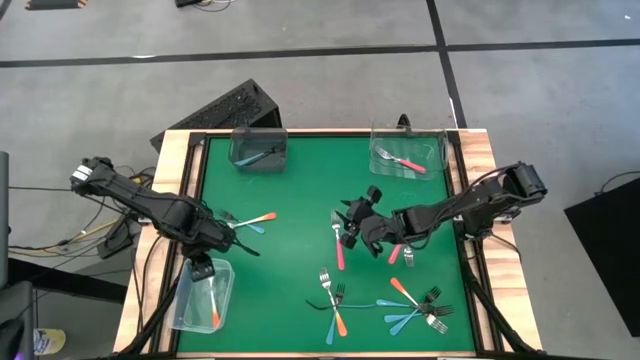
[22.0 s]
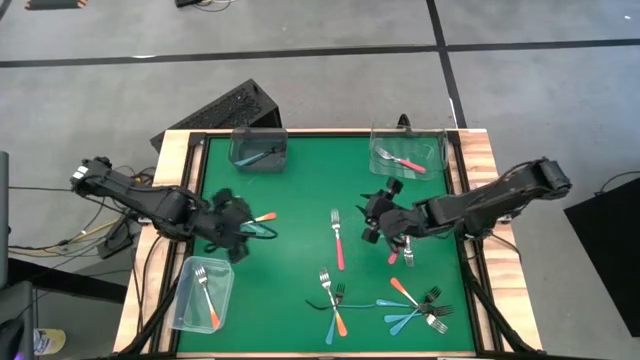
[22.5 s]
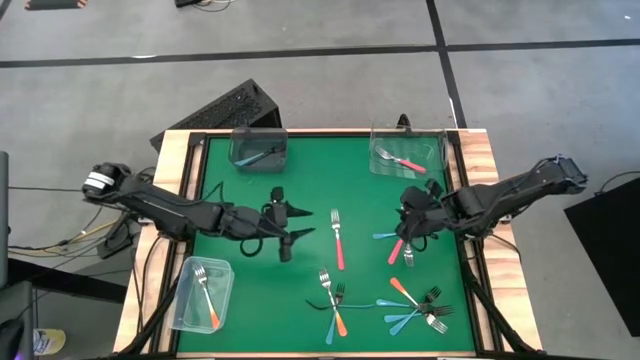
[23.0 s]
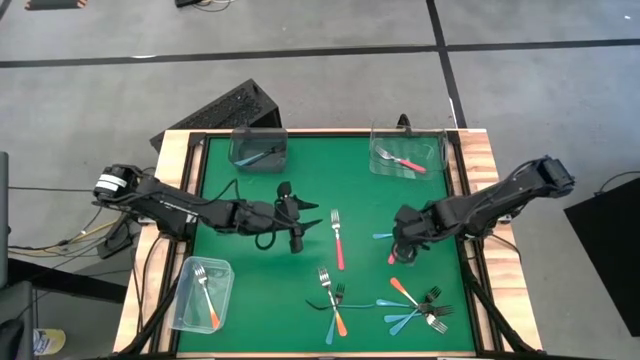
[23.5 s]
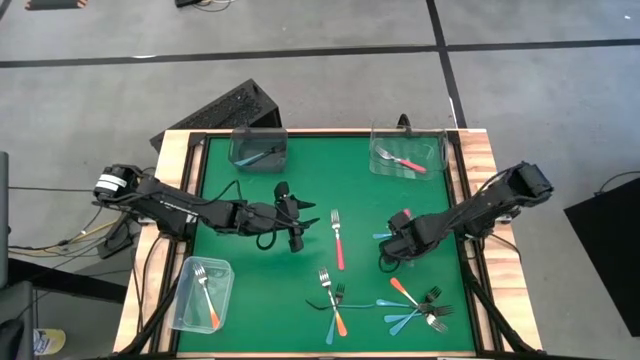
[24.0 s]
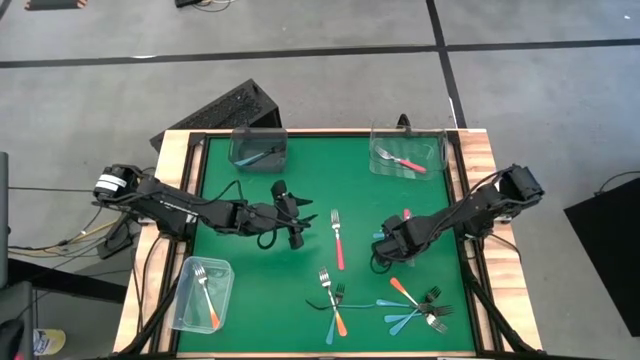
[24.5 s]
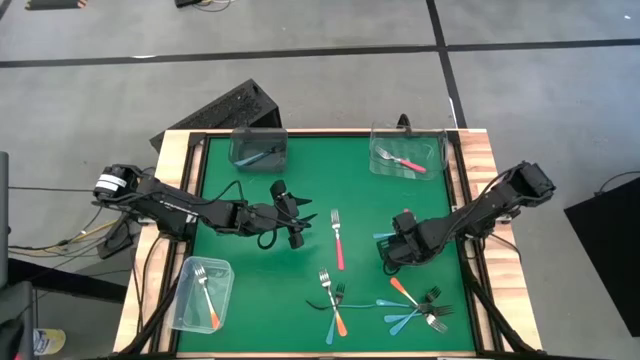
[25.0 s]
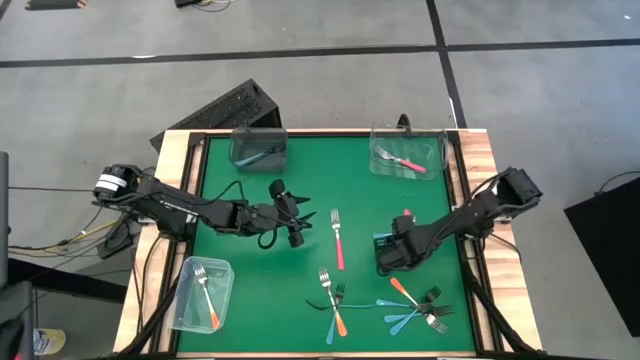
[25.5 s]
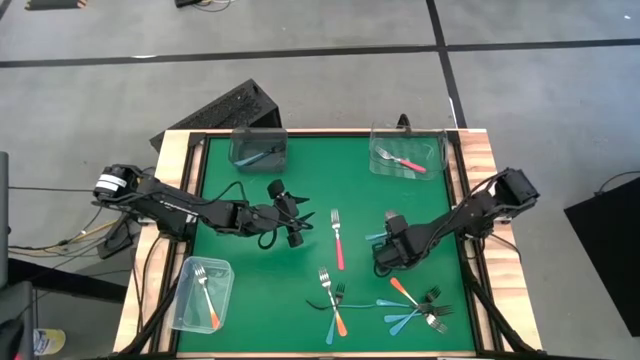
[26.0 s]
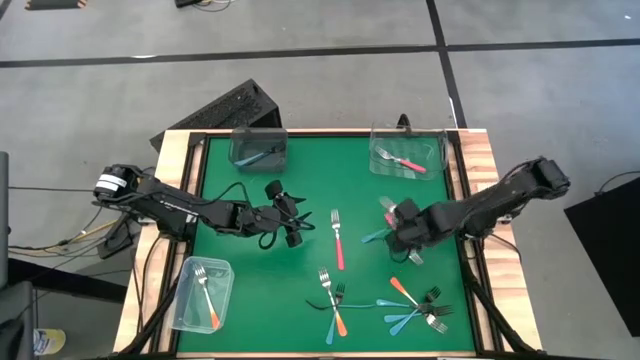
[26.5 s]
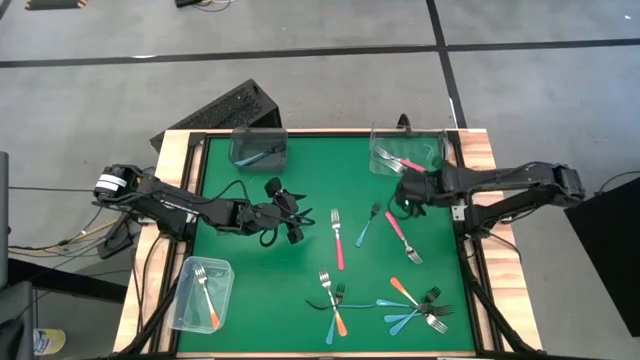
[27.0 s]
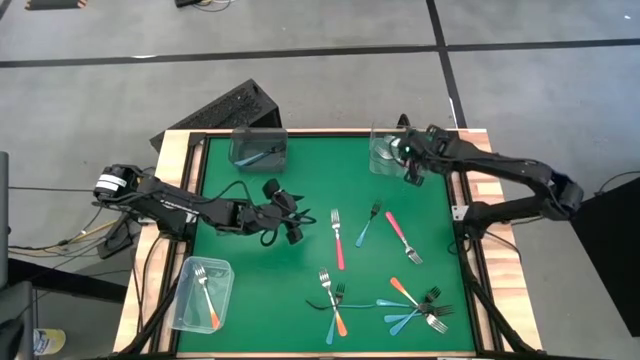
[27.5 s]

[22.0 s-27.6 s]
Task: Sort silverware by color (type)
Put the pink fork into the transparent bin

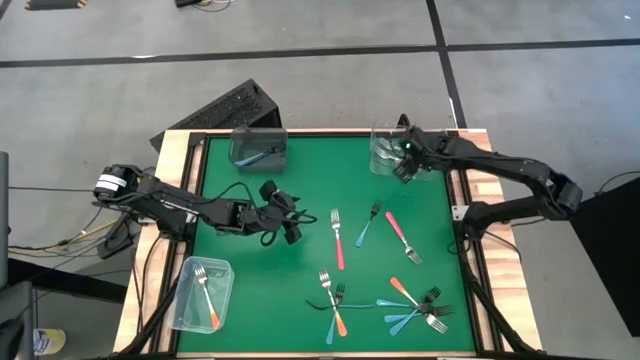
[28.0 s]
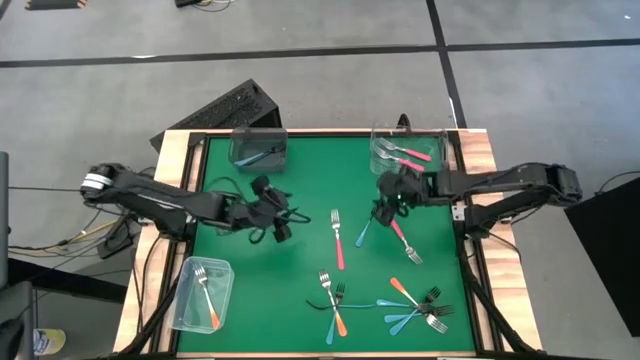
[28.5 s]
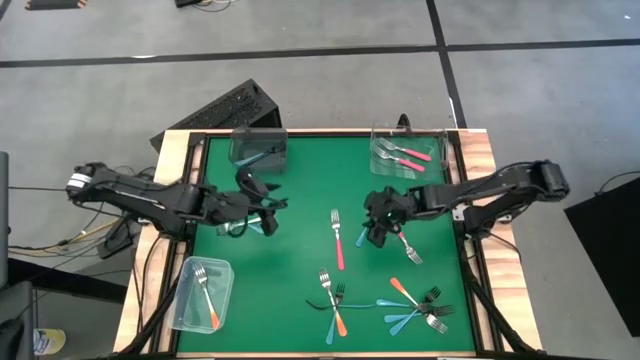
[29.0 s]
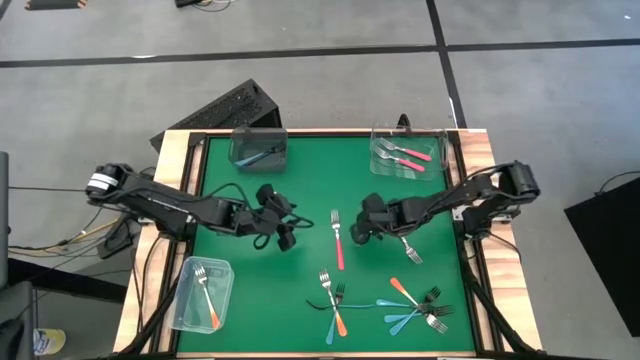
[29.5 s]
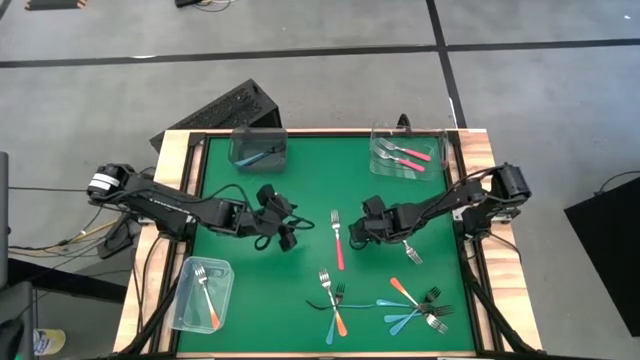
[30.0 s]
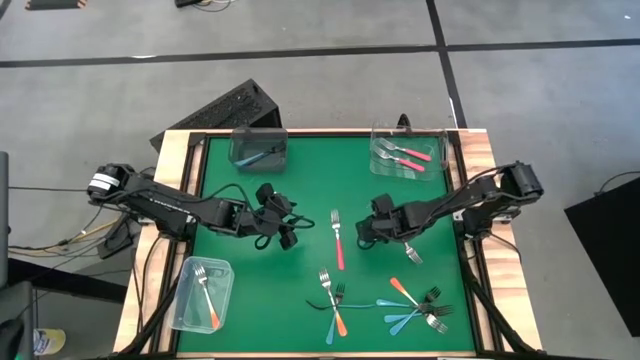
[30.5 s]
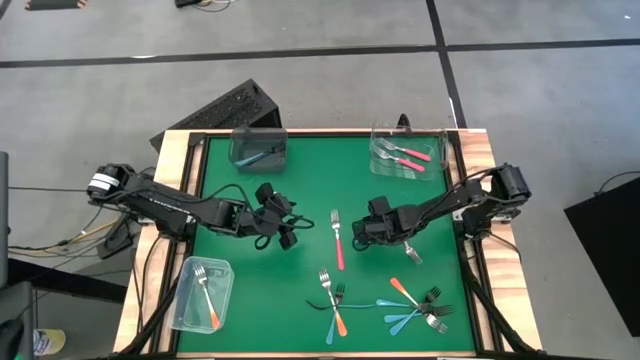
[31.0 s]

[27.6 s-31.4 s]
Put the blue fork into the black bin

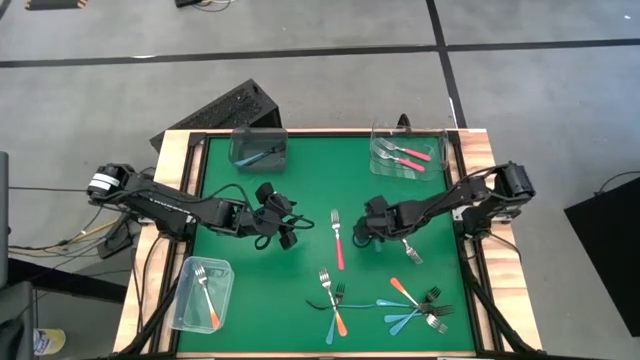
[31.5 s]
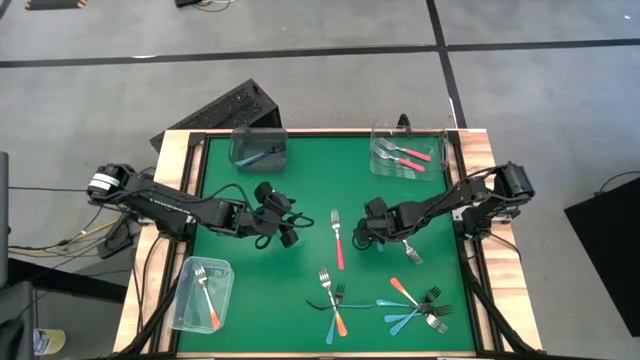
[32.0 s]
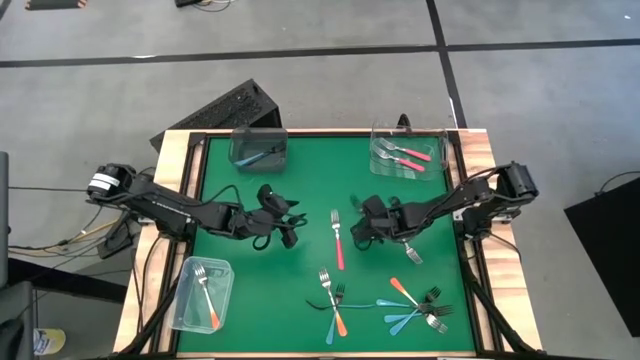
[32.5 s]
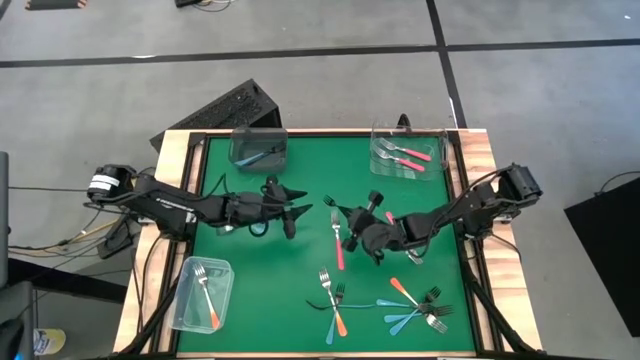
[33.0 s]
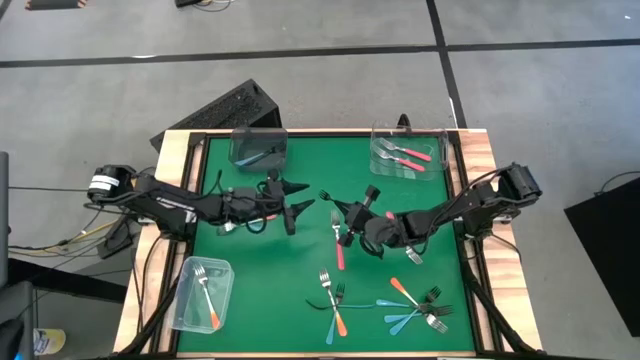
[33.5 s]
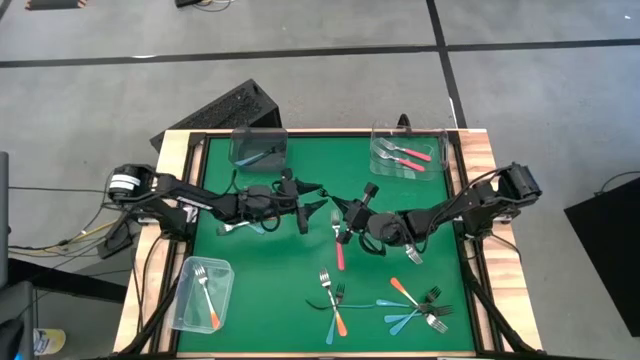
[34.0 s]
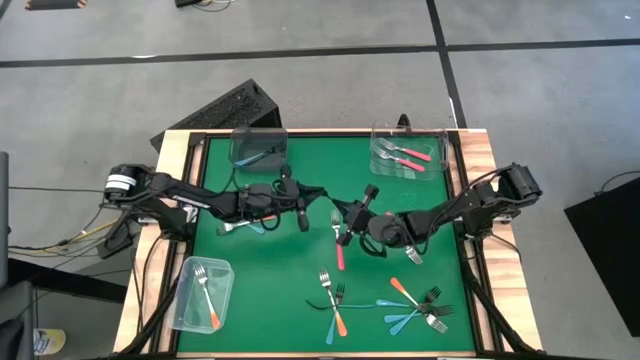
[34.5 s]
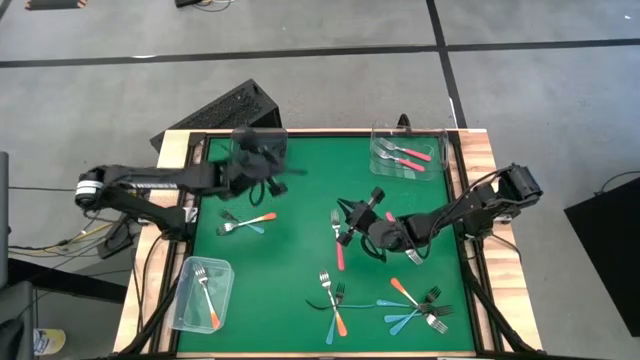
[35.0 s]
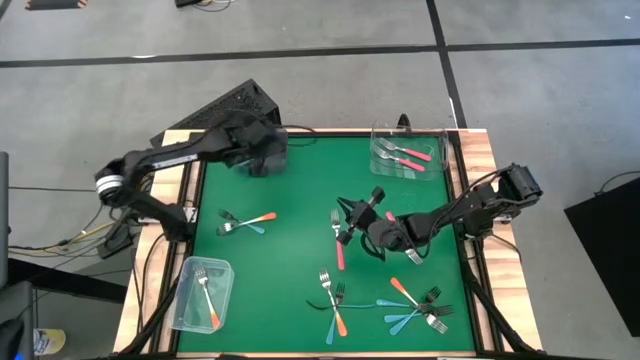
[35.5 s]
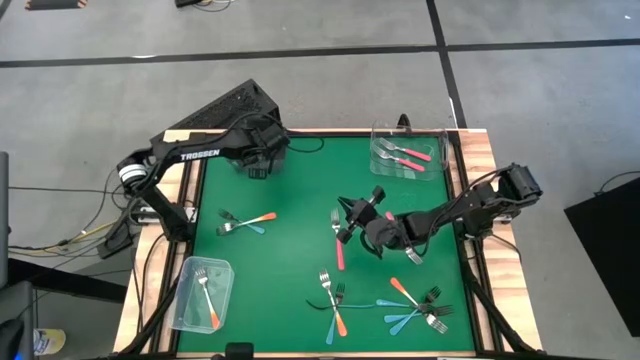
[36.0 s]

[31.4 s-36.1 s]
Put the blue fork into the black bin

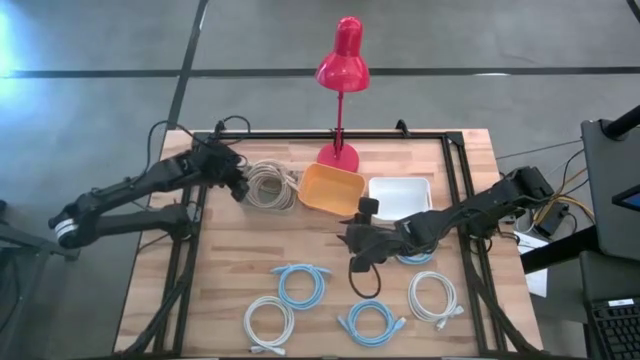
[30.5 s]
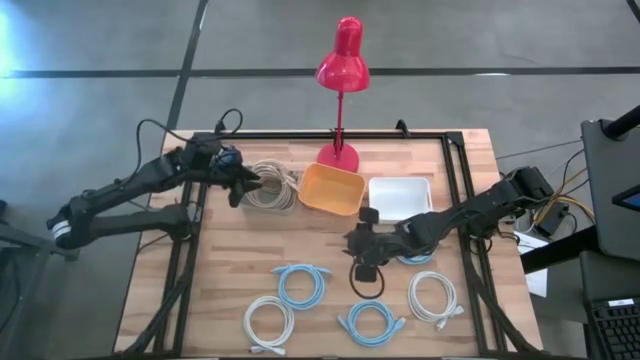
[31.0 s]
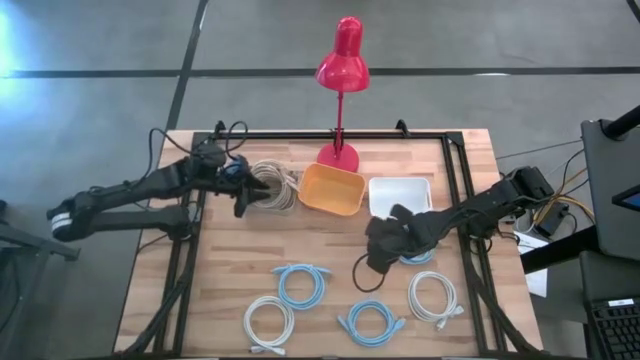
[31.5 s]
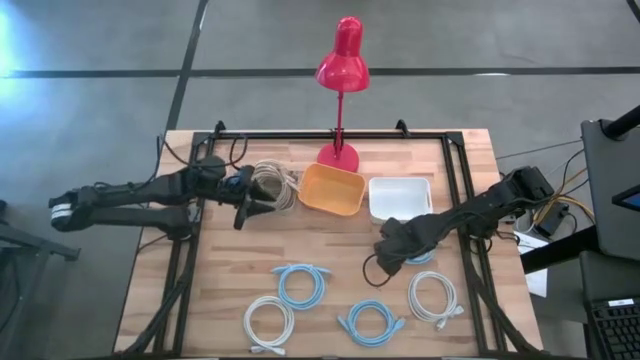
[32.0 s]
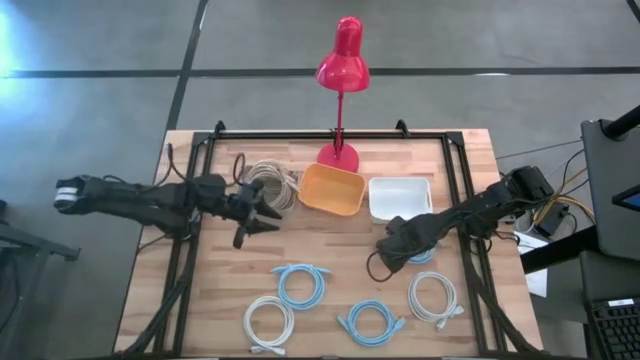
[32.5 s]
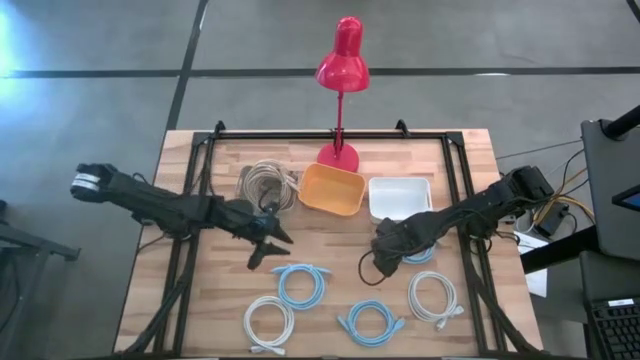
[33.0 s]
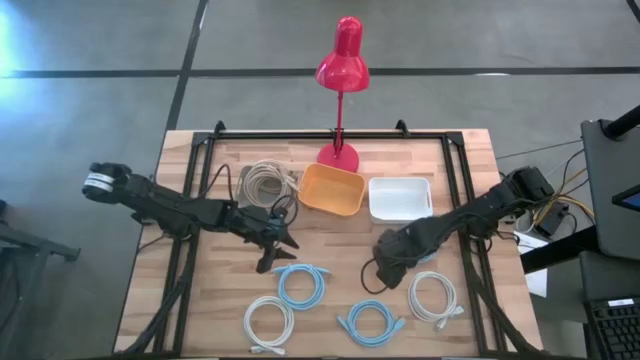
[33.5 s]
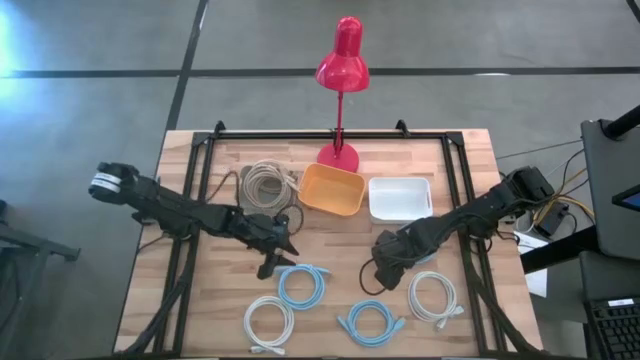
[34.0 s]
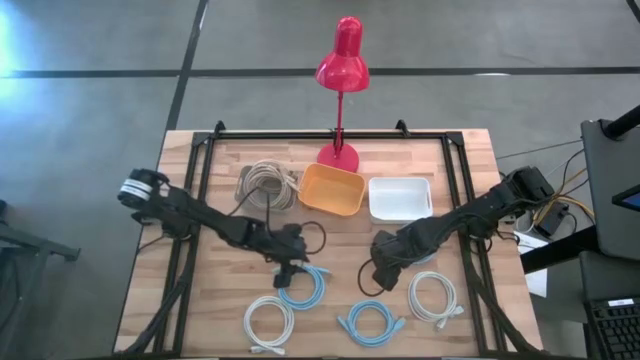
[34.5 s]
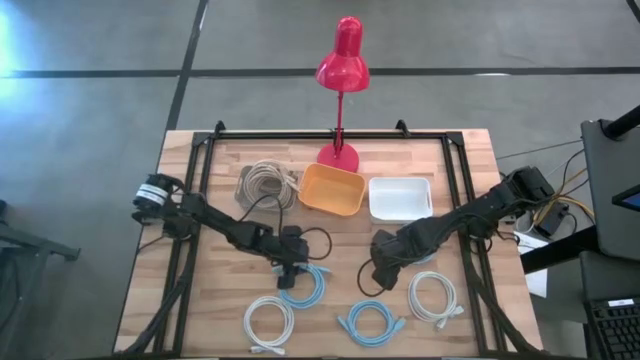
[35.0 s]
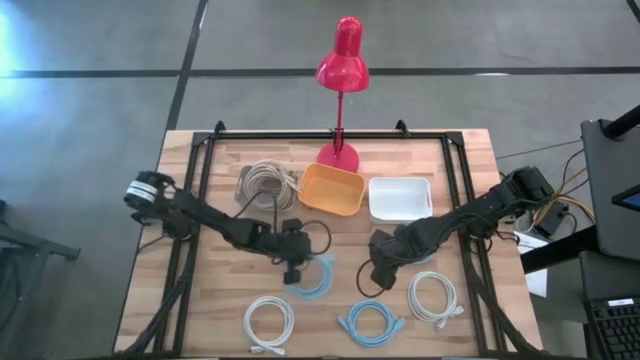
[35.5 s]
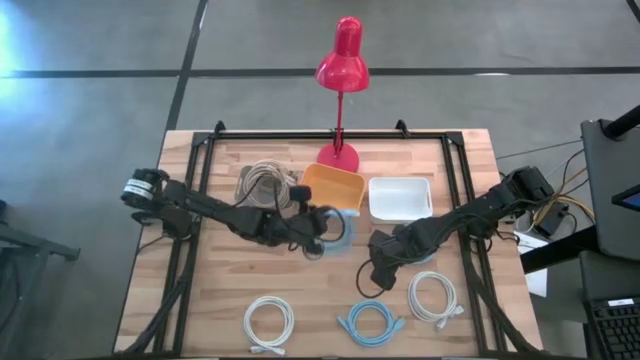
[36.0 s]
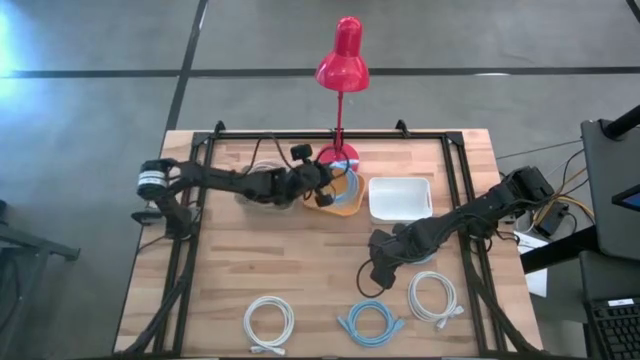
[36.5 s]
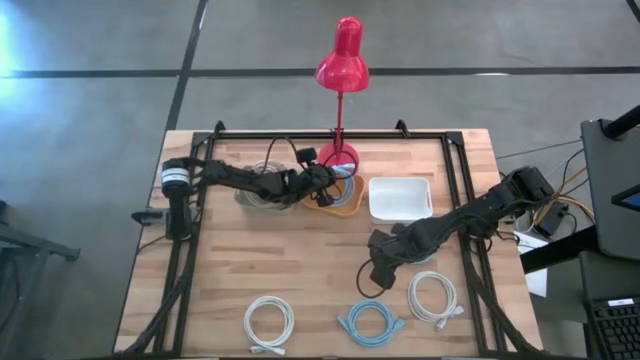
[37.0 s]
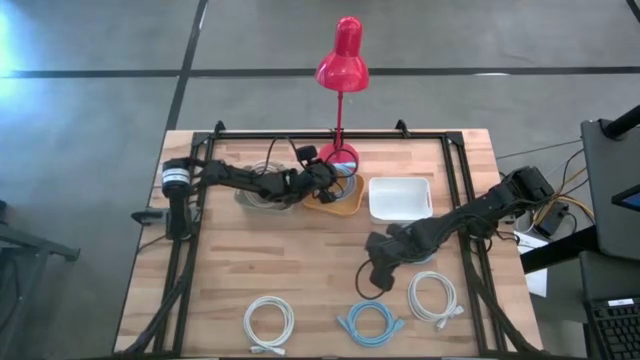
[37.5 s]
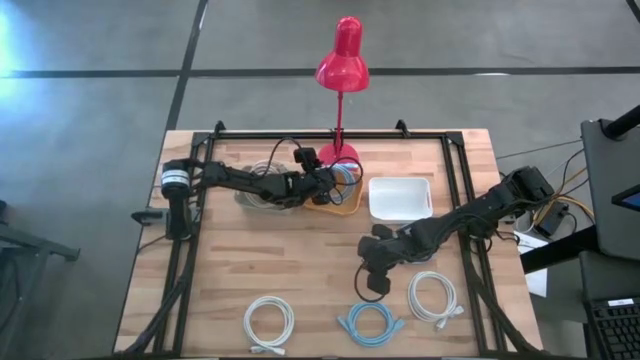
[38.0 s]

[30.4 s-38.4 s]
Task: Sort HDMI cables
Put the middle left blue hdmi cable into the orange bin
